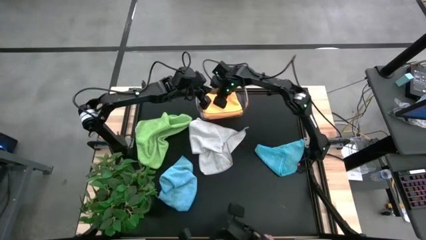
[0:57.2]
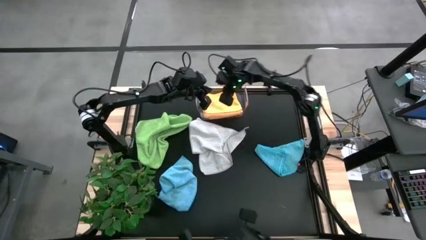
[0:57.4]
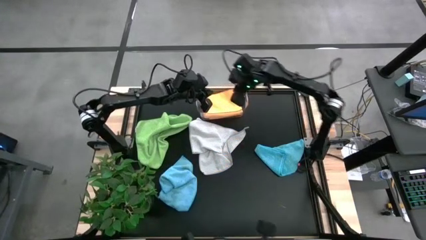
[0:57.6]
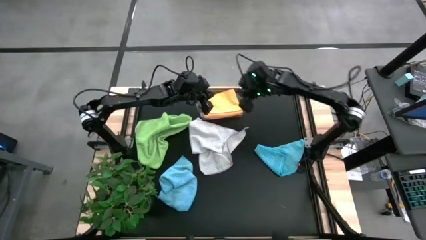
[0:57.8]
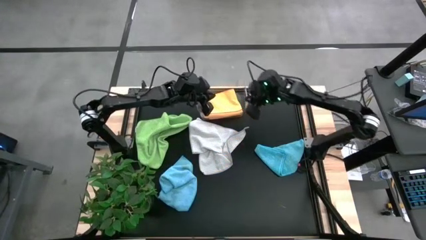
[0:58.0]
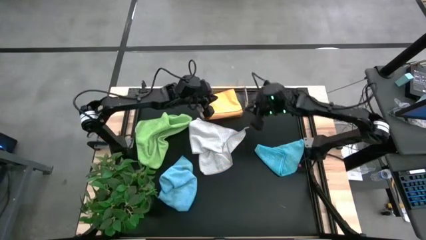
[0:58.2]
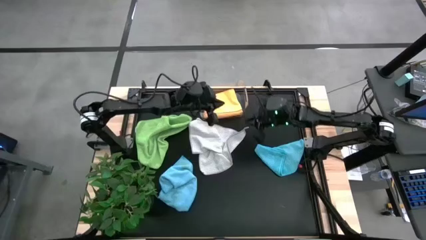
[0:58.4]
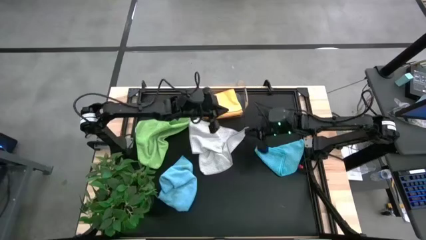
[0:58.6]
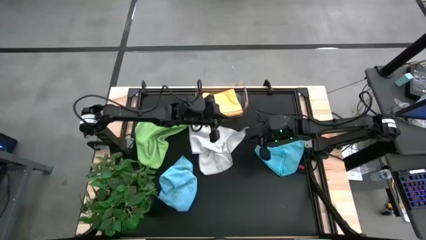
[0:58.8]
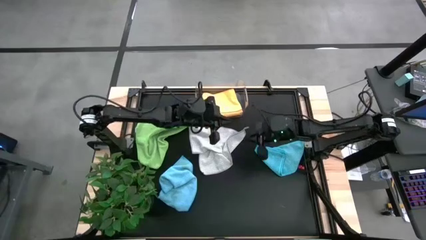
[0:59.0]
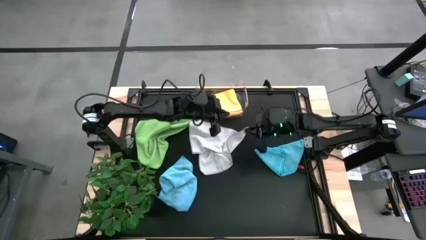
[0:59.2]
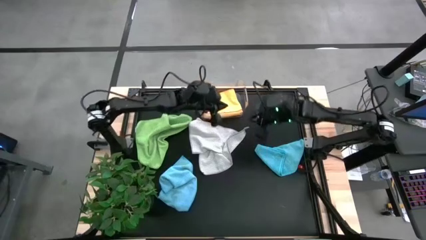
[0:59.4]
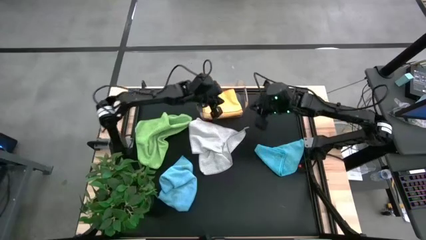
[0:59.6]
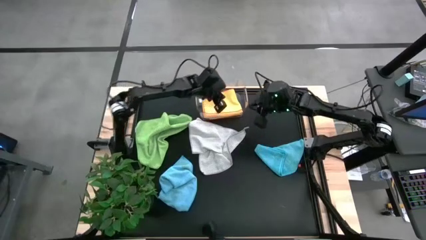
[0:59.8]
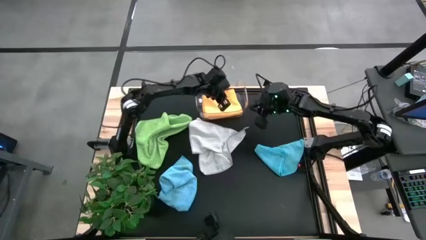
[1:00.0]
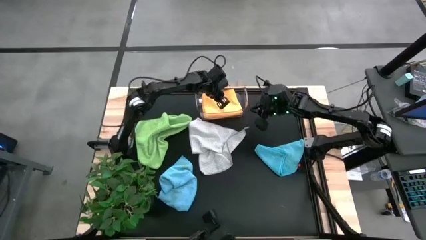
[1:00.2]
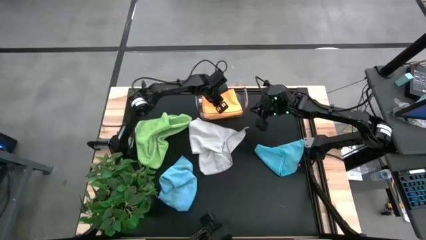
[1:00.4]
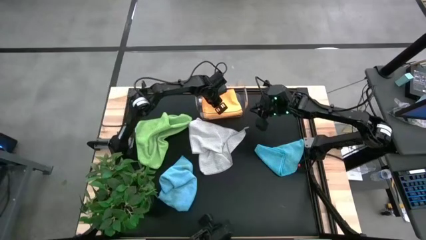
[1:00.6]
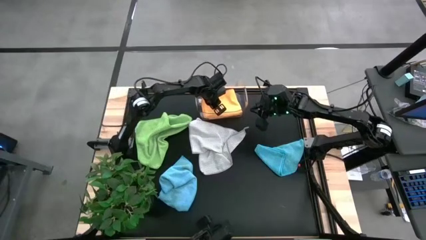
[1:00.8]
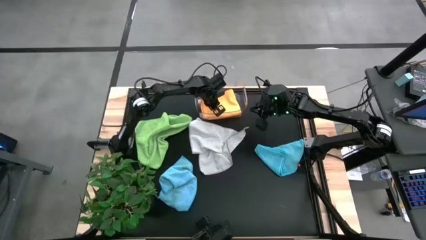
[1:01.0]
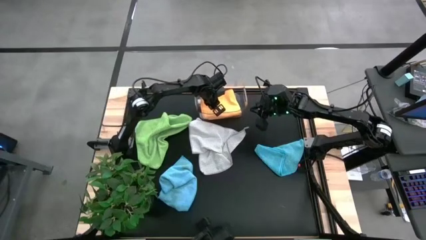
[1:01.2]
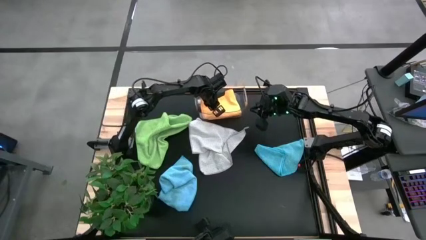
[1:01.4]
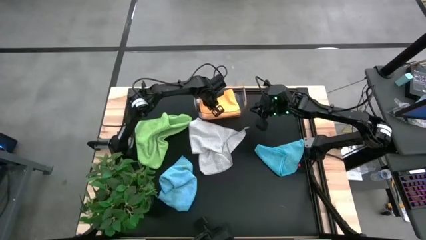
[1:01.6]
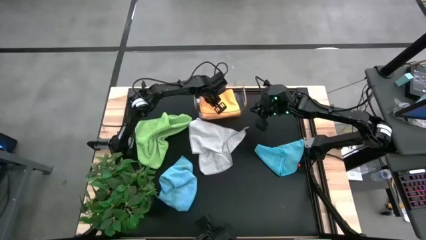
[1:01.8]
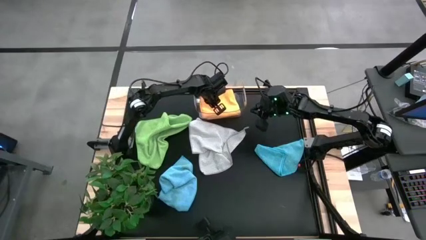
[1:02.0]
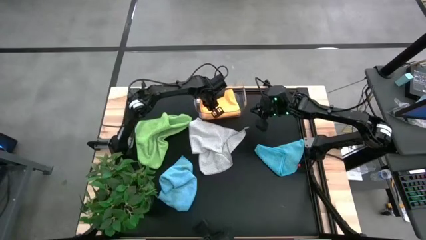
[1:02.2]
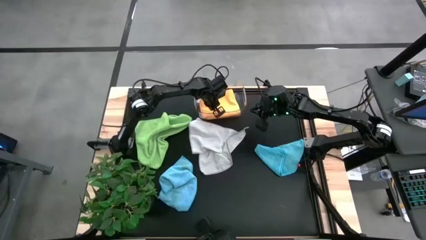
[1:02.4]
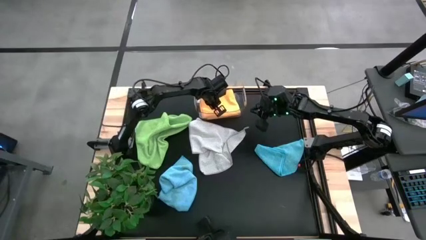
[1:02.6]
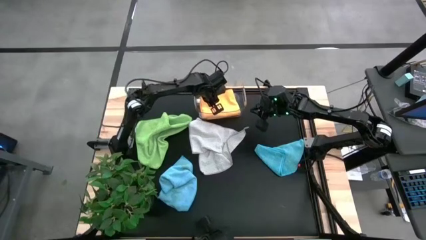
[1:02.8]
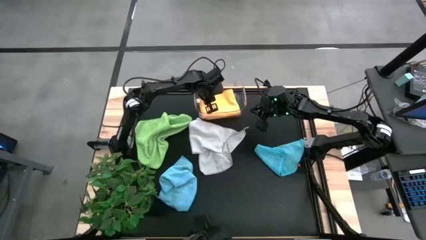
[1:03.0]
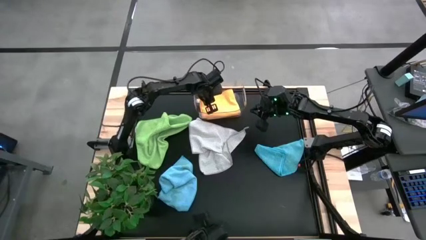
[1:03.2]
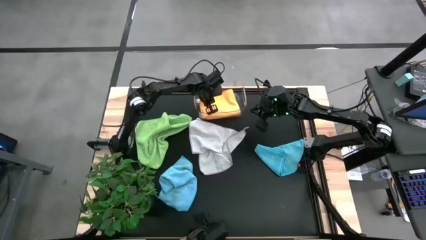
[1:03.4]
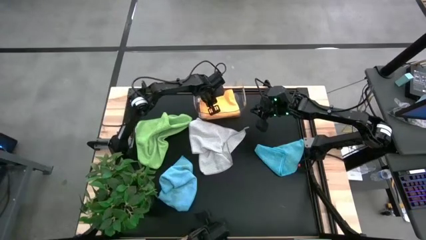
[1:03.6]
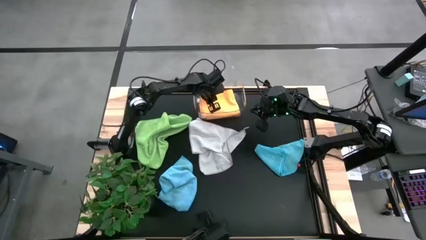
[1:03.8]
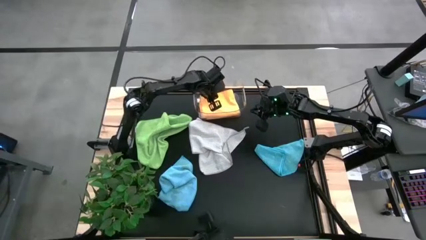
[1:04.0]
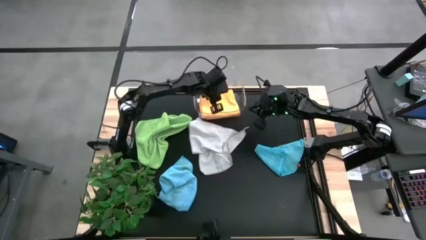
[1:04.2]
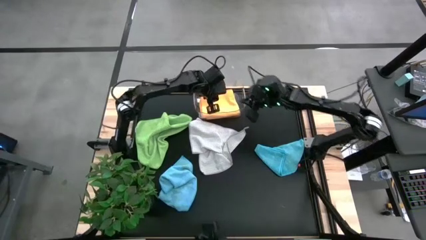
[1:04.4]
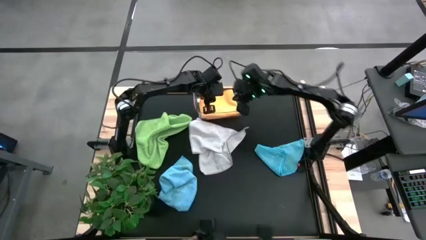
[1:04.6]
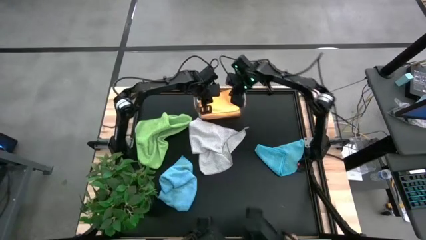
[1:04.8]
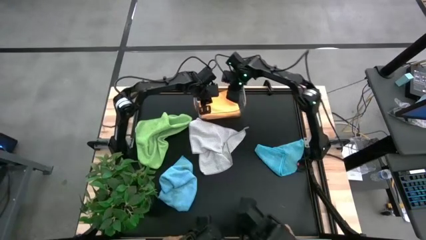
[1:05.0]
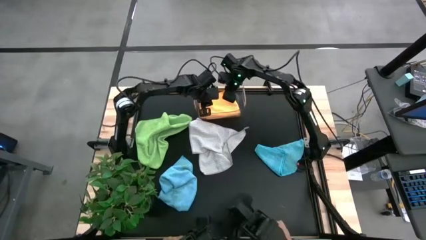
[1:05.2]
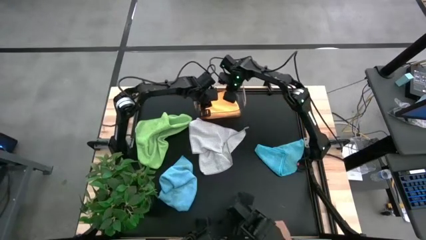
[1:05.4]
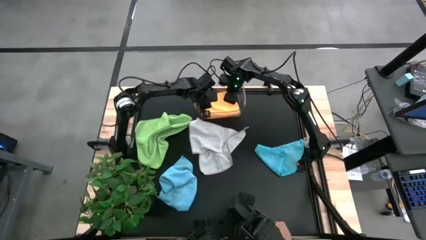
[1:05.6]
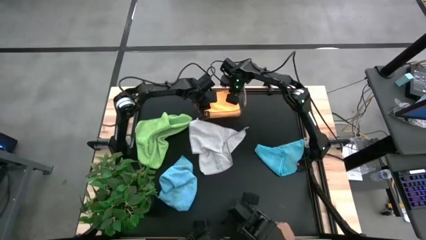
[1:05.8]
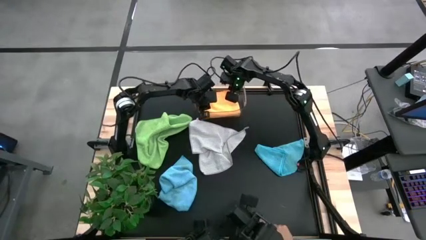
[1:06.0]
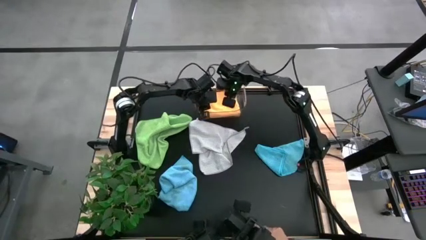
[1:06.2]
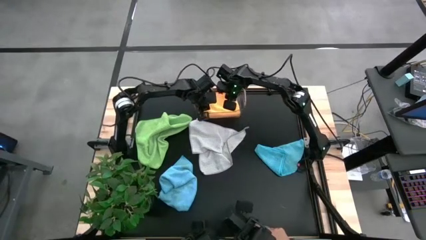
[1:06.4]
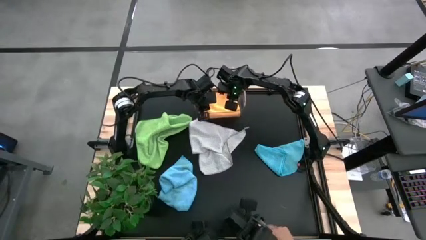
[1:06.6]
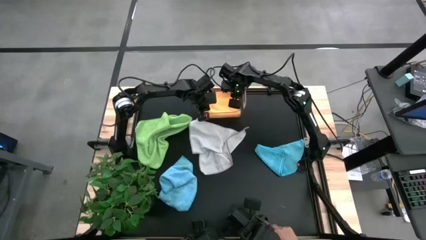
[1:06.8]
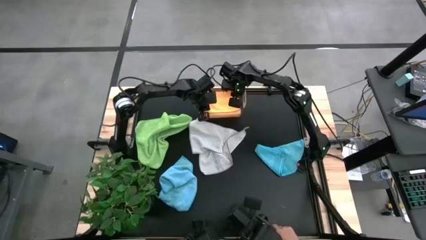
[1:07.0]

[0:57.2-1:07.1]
Task: Fold microfiber towels
Put the orange microfiber cloth into the transparent bin

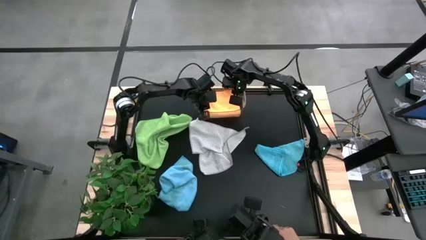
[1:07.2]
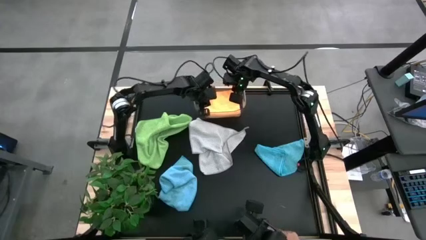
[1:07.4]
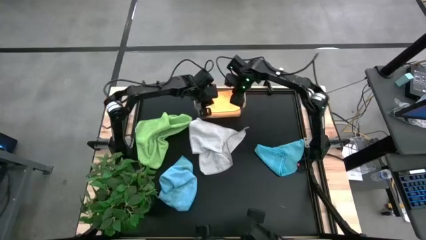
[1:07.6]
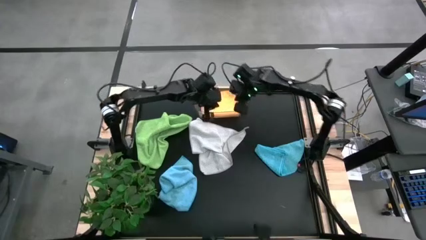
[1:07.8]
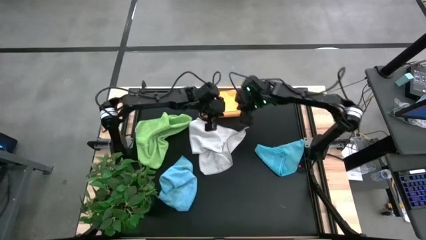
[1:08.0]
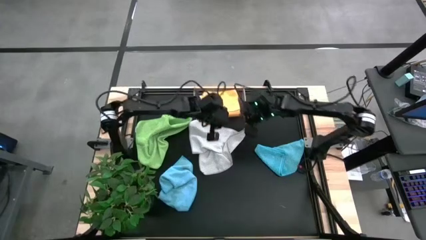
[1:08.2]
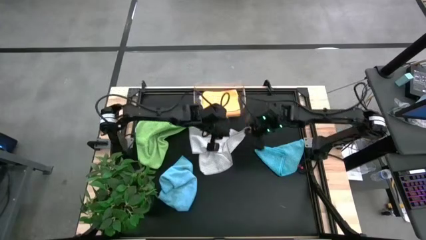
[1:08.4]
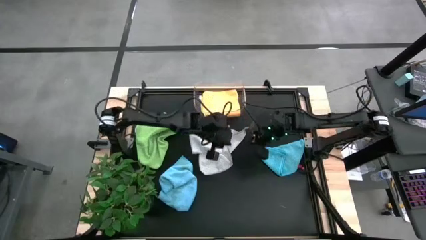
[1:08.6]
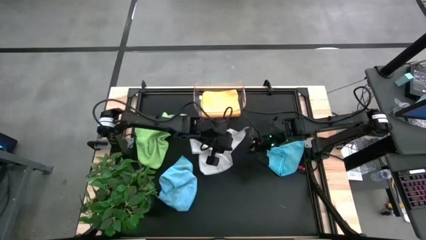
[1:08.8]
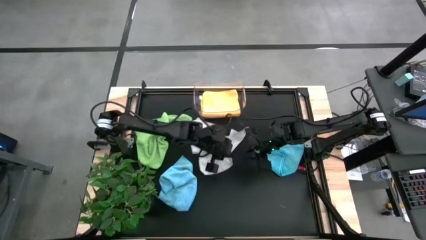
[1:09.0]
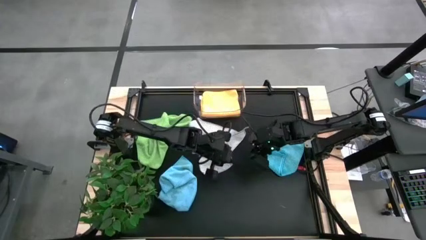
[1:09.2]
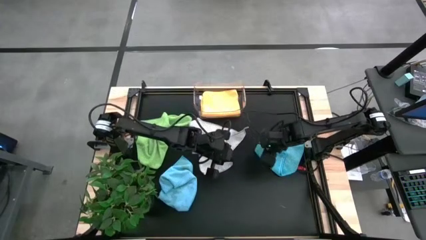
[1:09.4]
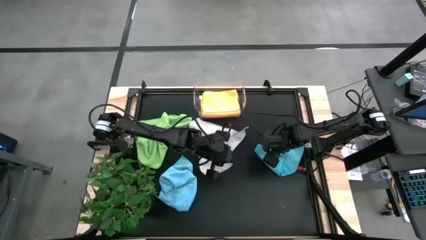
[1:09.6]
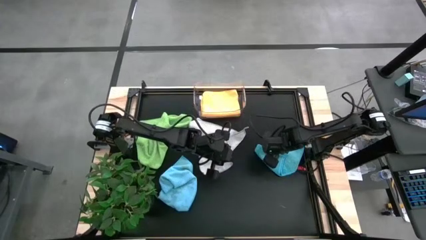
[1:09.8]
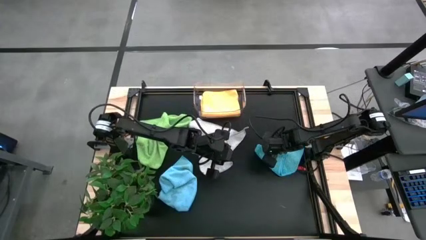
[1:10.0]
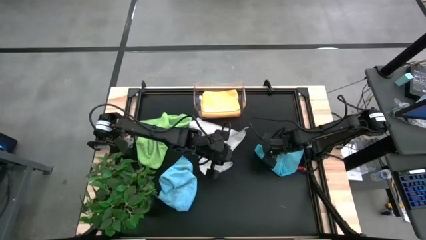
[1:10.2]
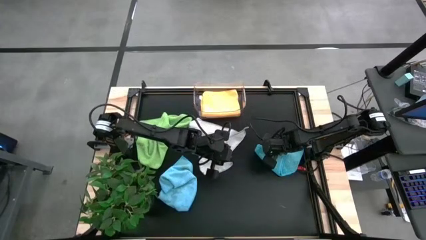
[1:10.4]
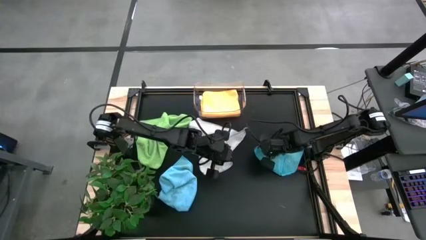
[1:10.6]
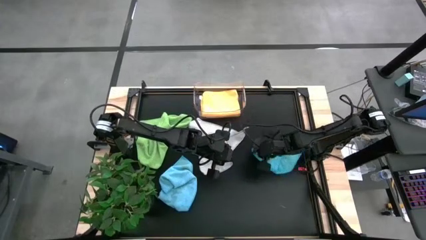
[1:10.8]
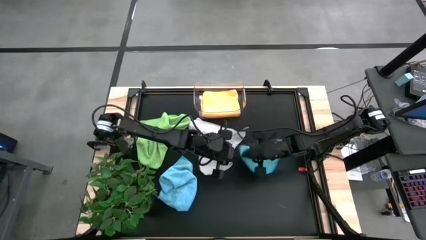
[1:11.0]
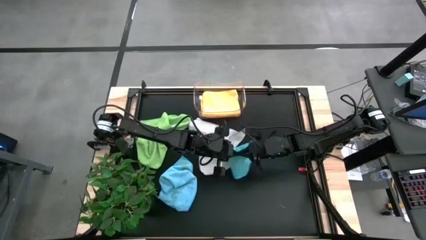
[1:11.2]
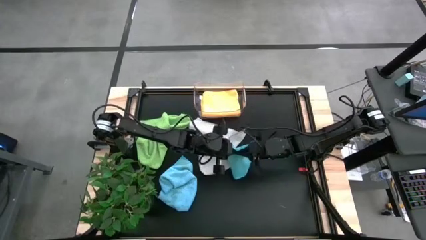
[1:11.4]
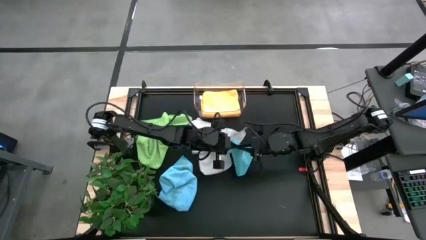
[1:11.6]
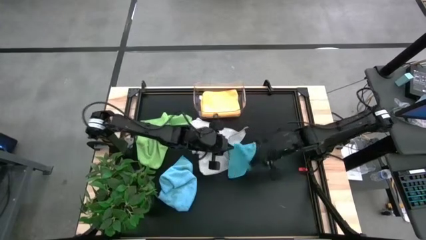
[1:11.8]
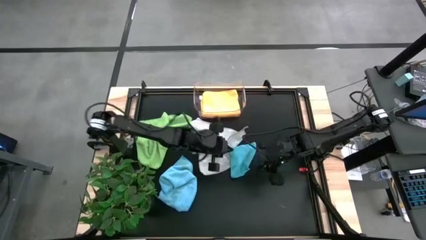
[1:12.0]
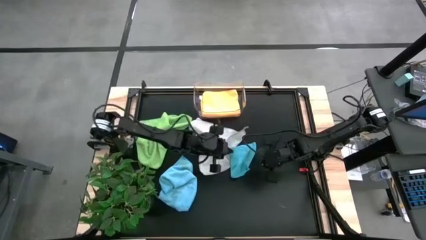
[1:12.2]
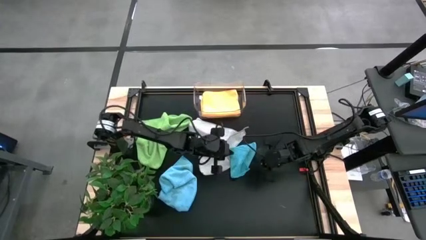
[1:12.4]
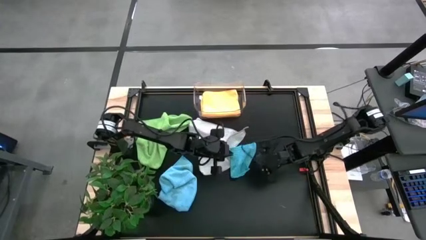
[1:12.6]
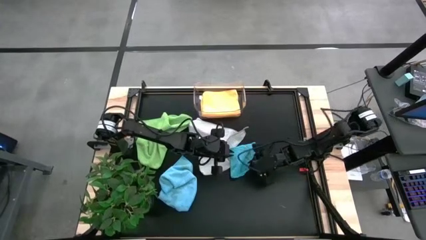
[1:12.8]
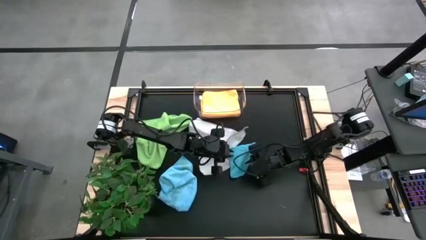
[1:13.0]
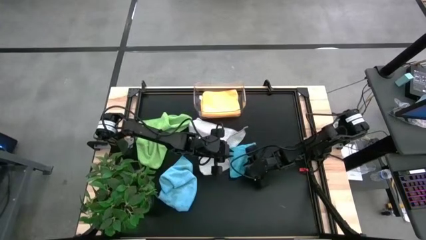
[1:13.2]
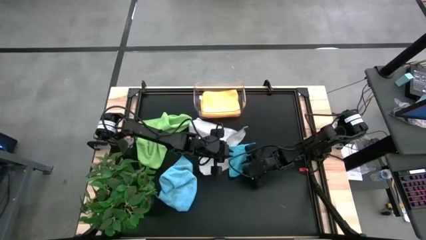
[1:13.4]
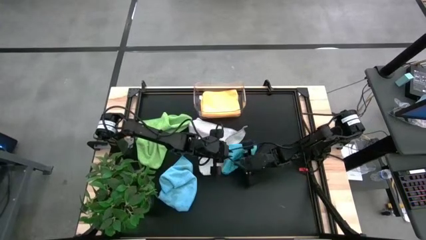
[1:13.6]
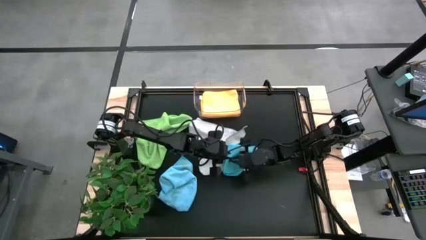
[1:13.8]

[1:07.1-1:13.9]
Fold the right blue microfiber cloth

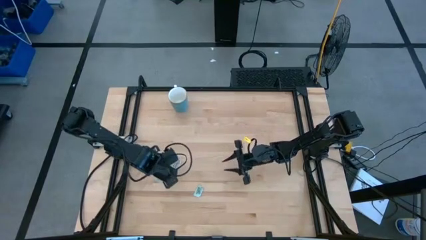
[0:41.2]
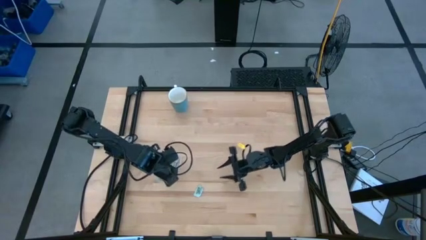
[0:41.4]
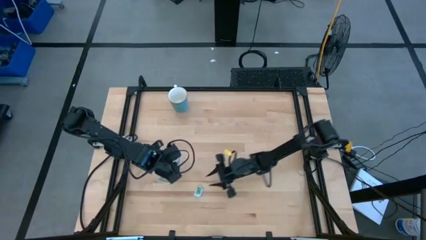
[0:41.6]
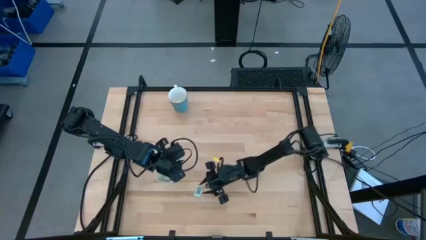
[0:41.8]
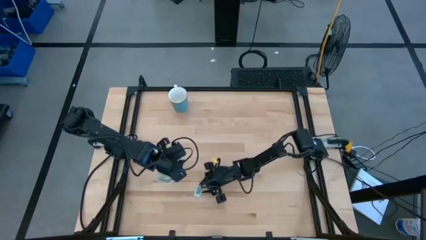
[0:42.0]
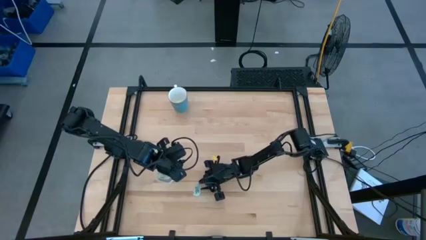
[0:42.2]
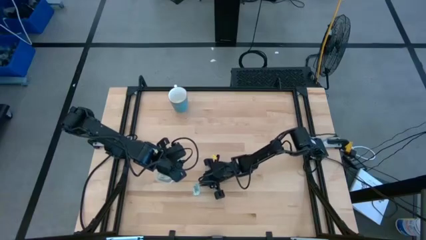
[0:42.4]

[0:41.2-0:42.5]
Task: Pick and place Stevia / Truvia into bins
Put the stevia packet into the transparent container
